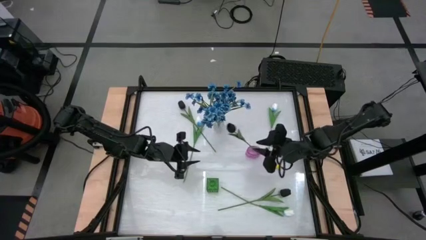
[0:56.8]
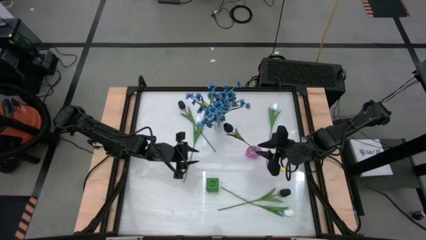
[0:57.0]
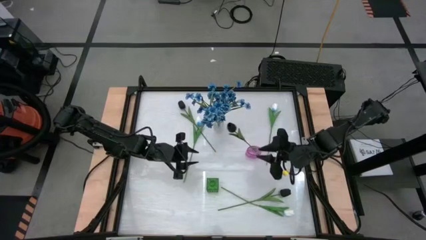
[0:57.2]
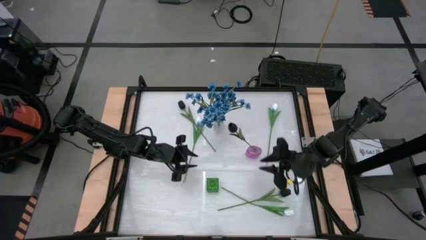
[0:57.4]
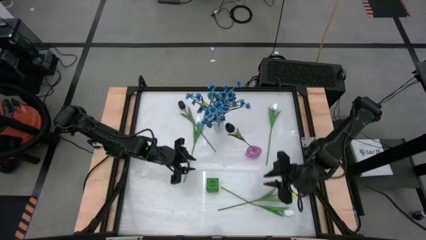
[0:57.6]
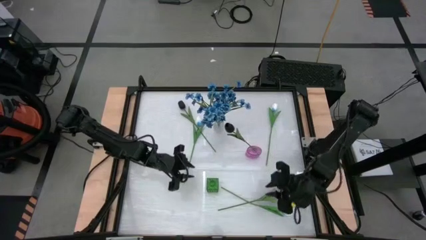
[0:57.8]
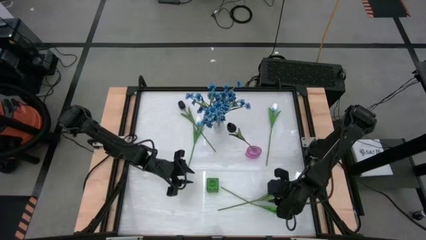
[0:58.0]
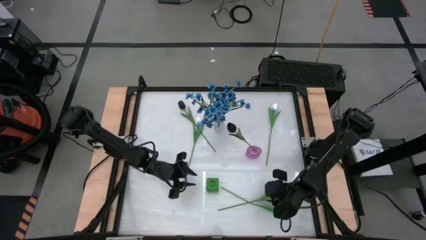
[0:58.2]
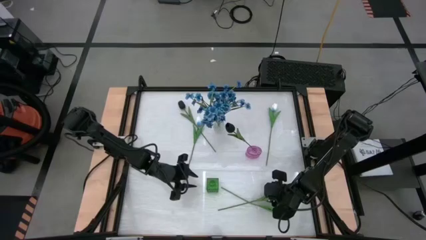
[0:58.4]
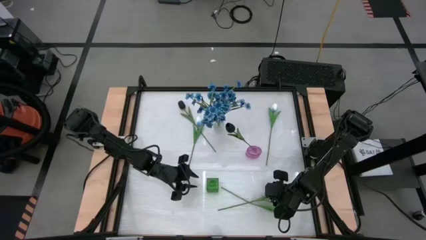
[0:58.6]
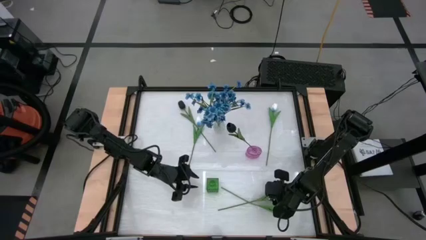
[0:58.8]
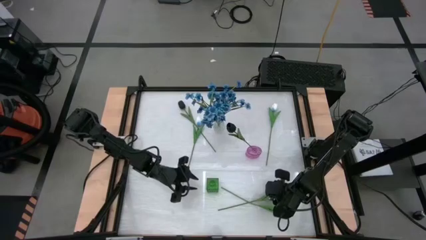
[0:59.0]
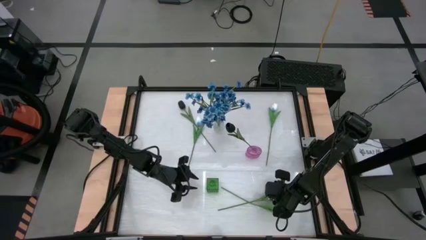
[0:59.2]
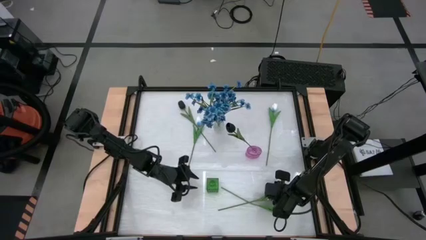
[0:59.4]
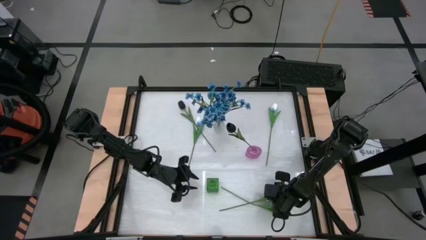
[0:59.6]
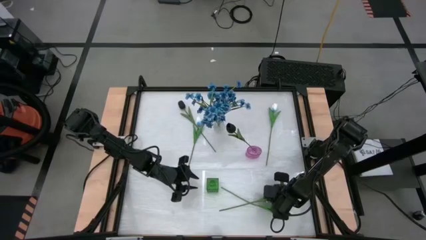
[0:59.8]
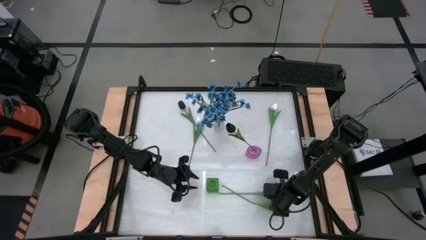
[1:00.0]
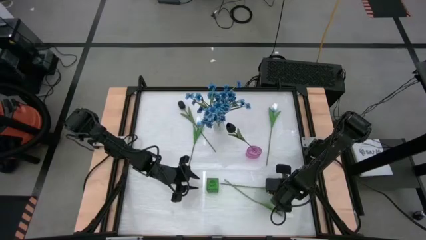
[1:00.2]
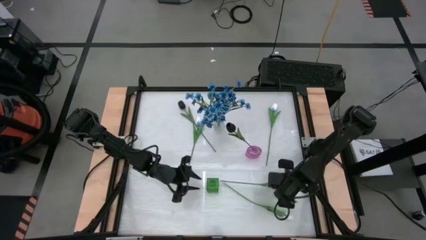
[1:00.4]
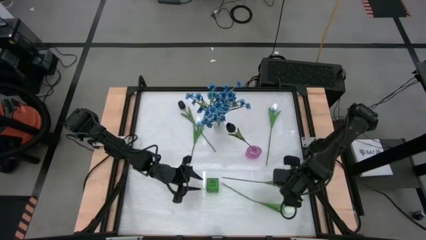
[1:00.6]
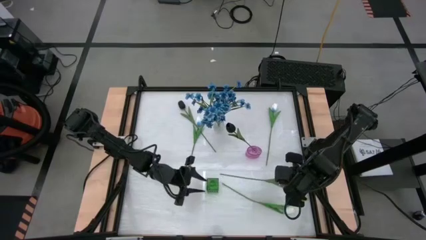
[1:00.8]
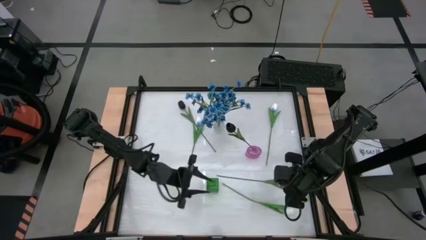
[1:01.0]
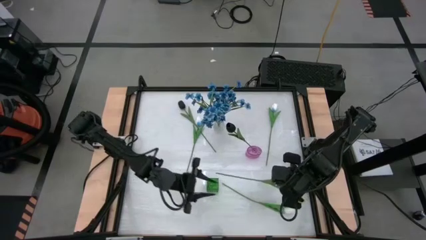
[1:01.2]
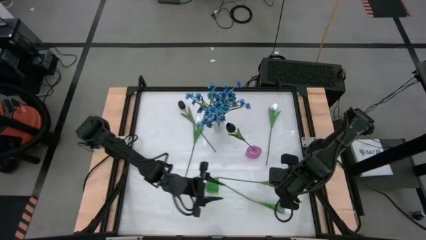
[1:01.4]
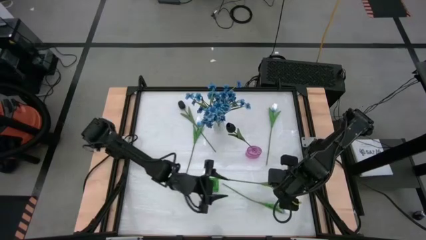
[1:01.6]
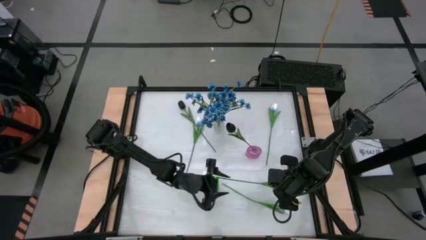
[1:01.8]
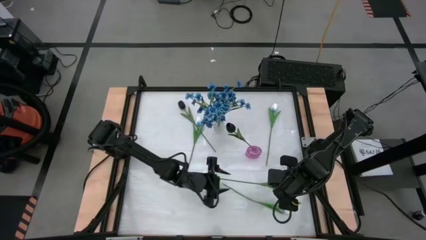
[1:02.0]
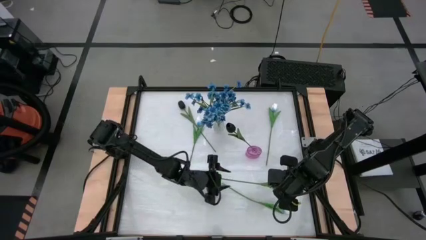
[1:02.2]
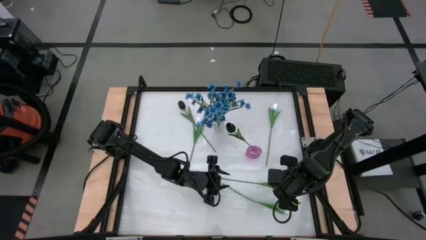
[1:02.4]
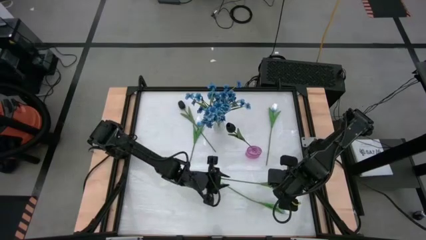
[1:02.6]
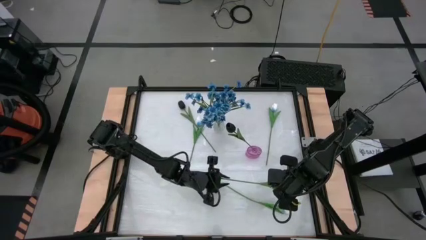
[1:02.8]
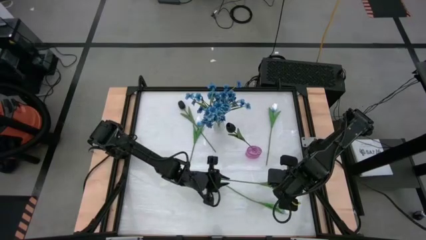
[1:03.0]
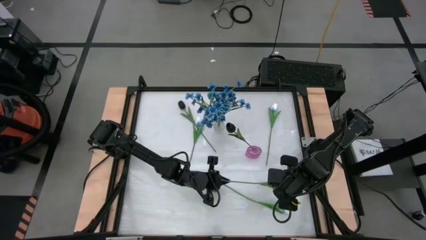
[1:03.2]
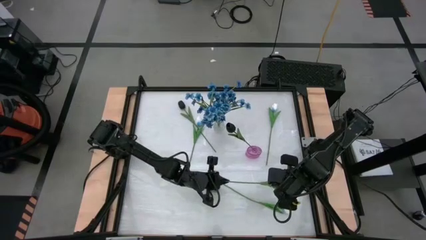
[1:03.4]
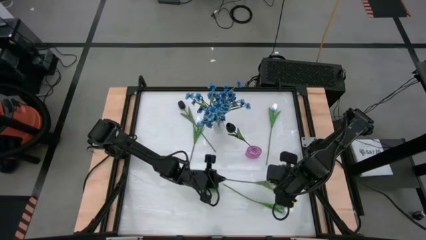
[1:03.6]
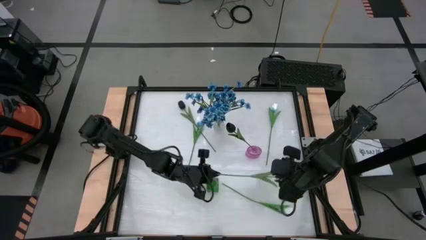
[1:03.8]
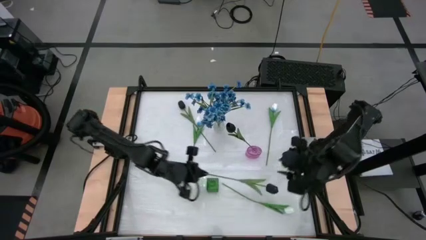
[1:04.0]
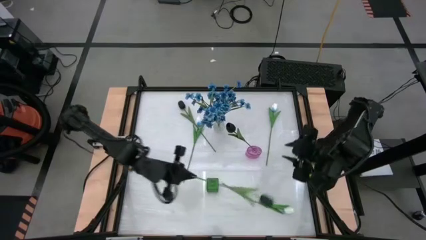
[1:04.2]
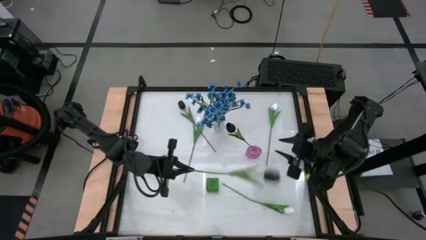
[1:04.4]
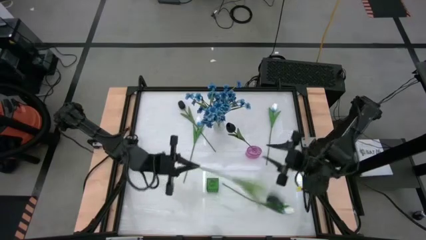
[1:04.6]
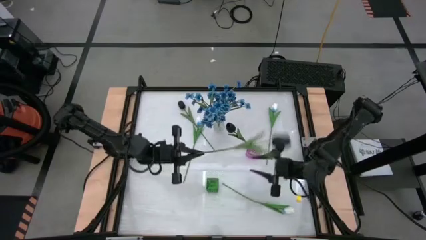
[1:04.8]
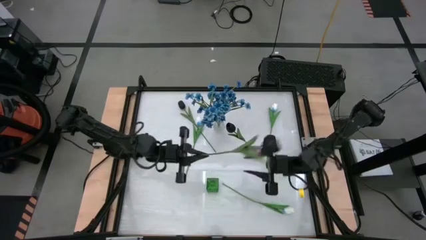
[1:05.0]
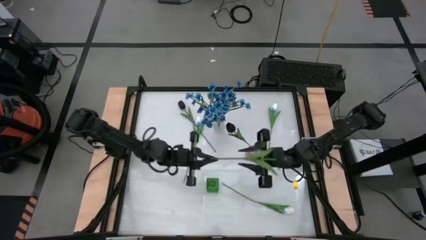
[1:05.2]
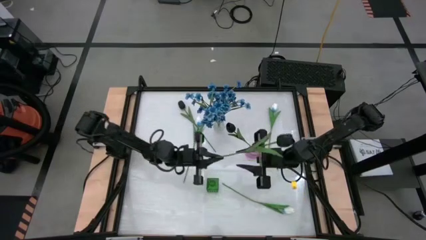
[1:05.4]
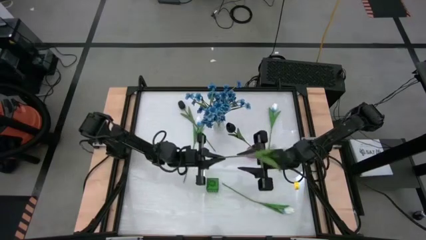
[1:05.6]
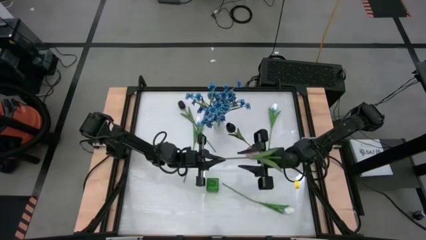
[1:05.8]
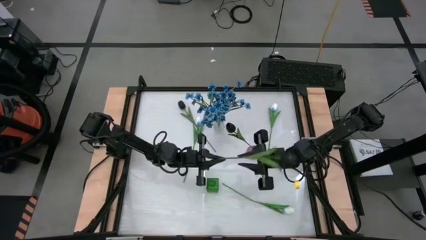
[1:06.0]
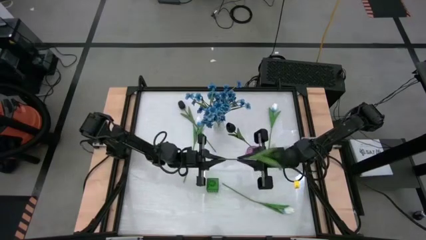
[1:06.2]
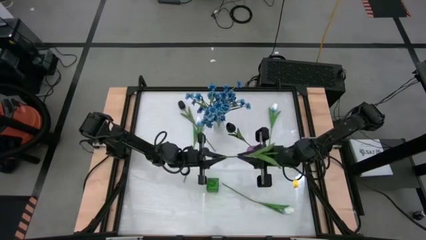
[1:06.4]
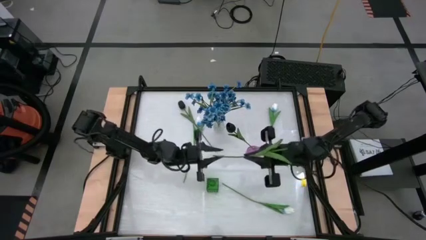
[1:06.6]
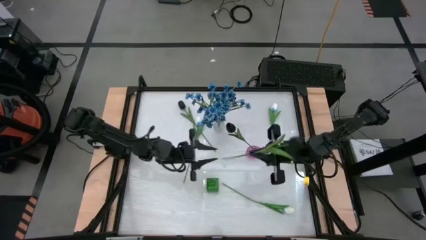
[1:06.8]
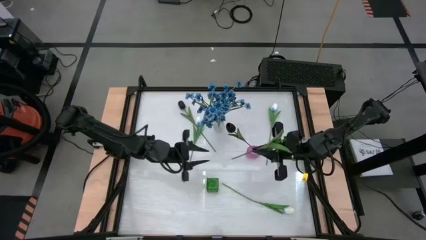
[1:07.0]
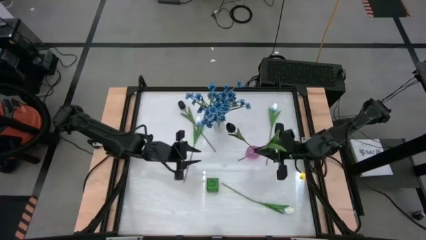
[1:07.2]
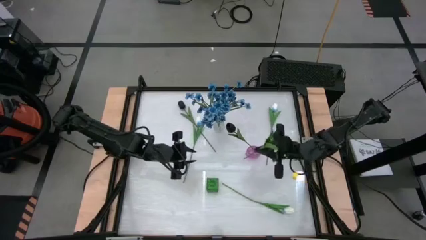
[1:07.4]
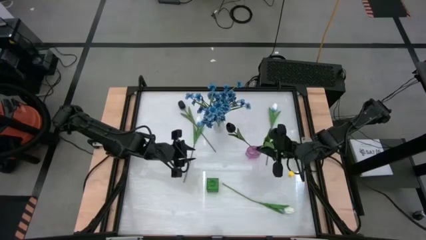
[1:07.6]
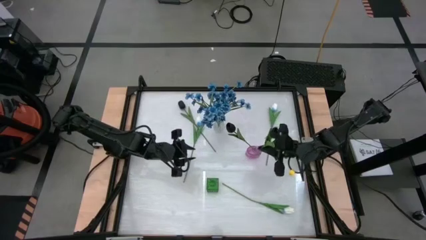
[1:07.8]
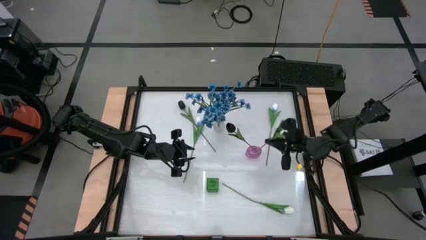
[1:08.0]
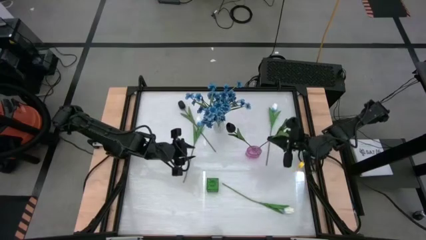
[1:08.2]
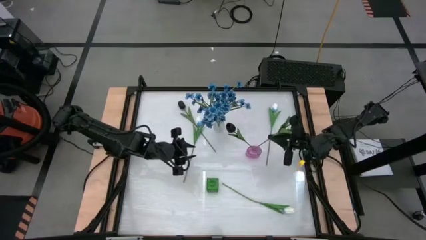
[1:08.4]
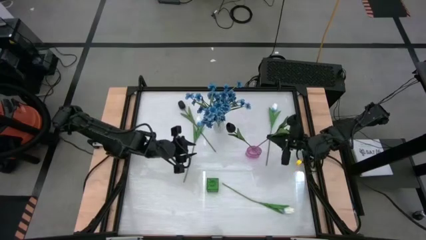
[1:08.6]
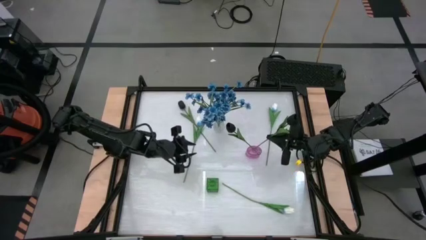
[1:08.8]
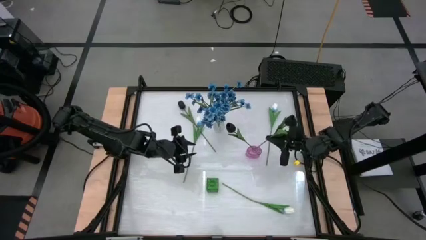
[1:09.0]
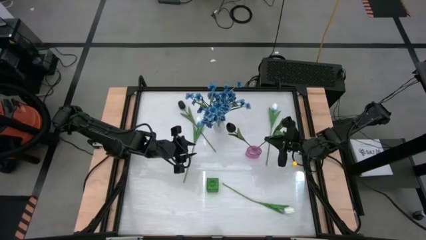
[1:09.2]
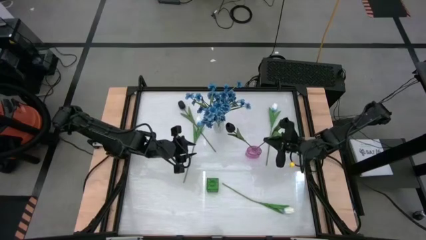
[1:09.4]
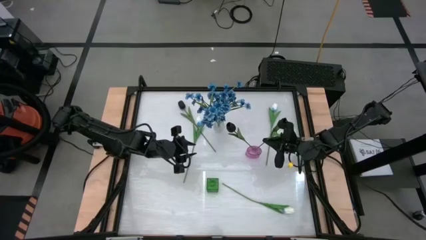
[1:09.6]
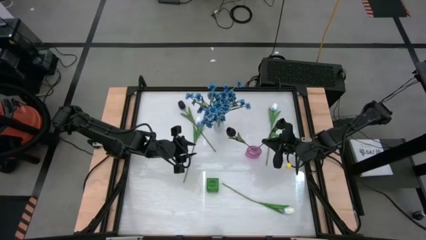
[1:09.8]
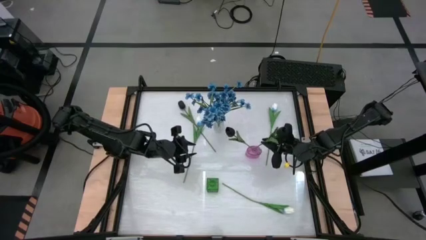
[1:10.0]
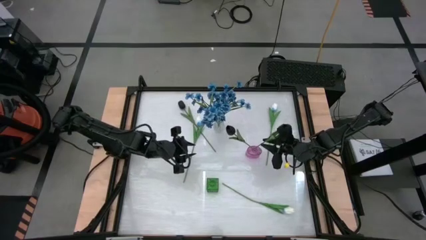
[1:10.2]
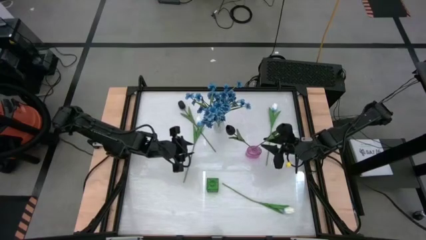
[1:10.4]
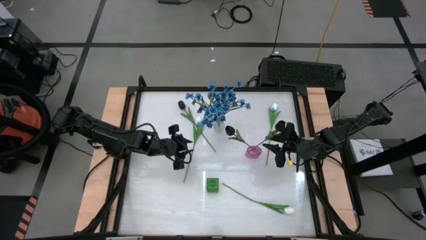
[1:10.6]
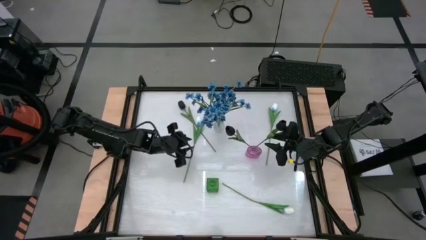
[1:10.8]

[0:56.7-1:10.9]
Task: Sort flowers into vase by color
Put the bottom black tulip into the purple vase

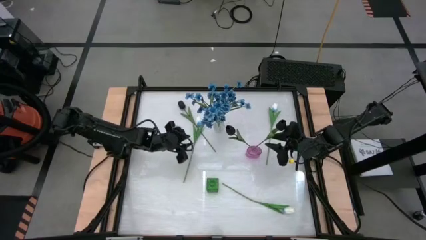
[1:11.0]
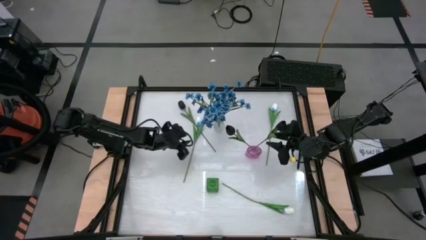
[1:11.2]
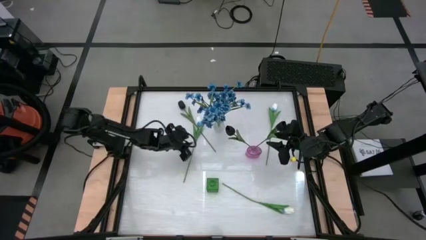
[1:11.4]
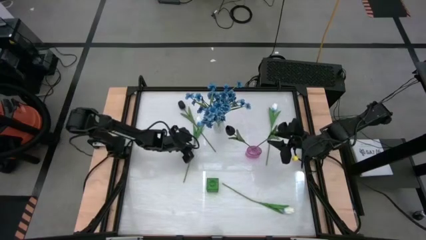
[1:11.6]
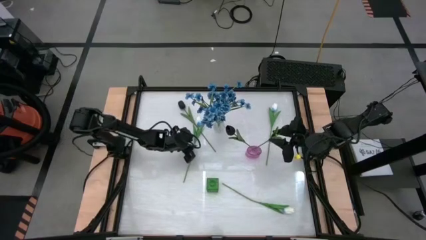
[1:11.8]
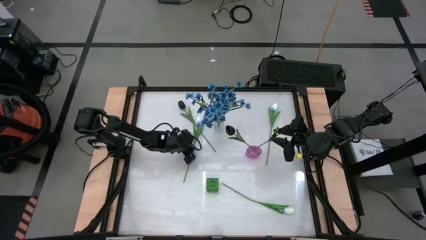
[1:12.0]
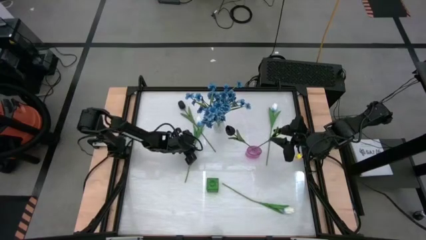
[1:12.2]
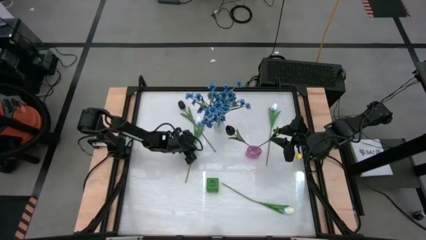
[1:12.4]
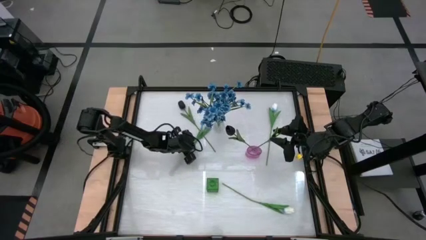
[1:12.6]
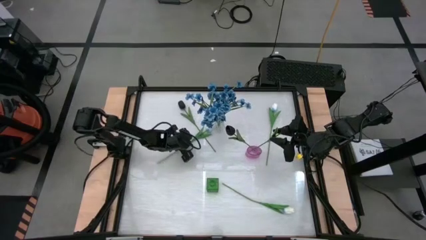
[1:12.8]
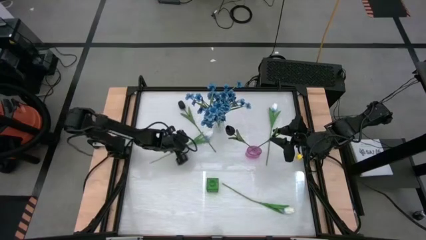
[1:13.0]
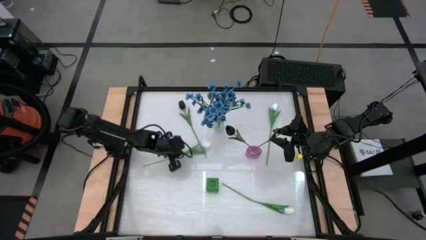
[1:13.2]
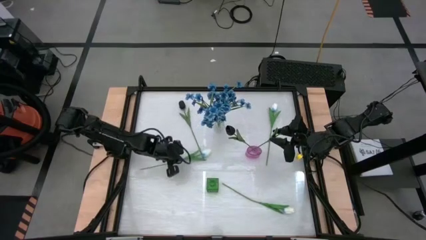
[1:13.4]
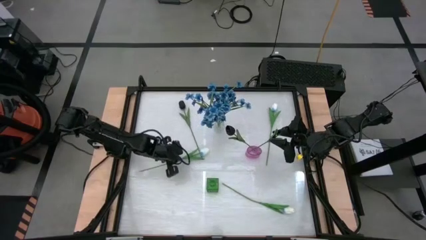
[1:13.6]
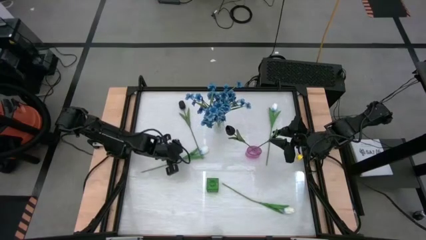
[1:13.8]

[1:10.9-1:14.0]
Adjust the white tulip
